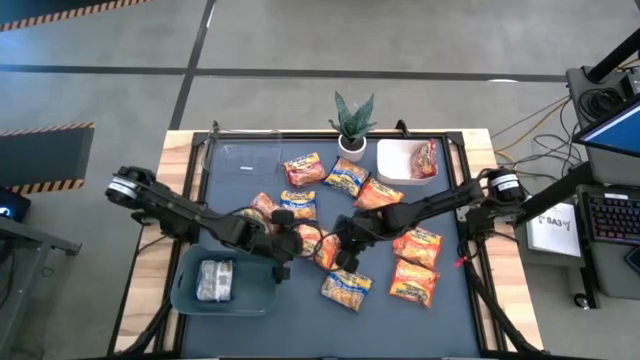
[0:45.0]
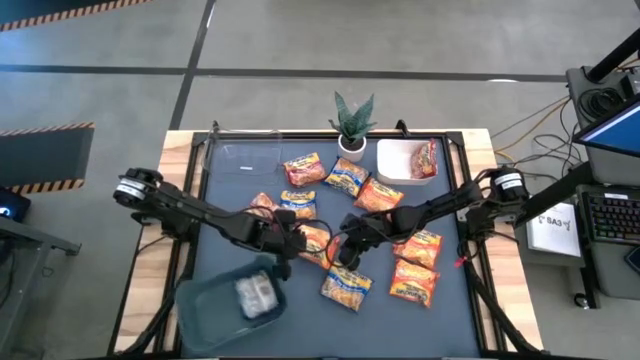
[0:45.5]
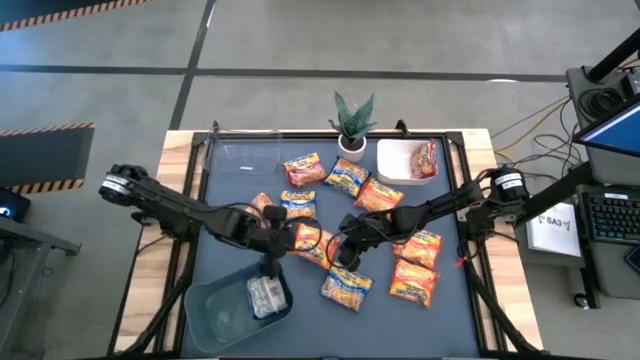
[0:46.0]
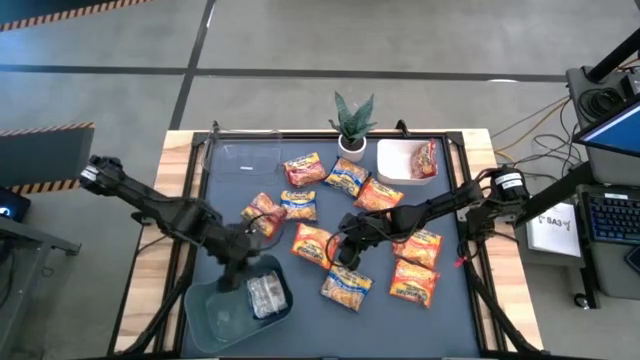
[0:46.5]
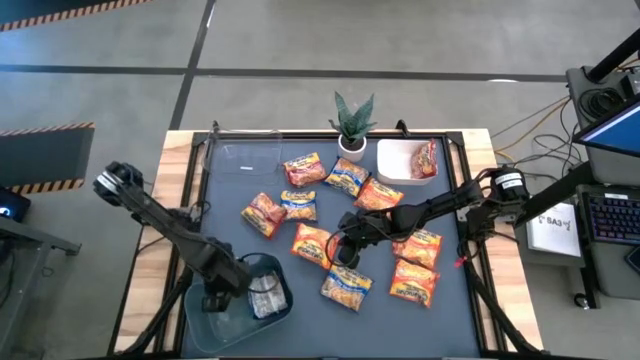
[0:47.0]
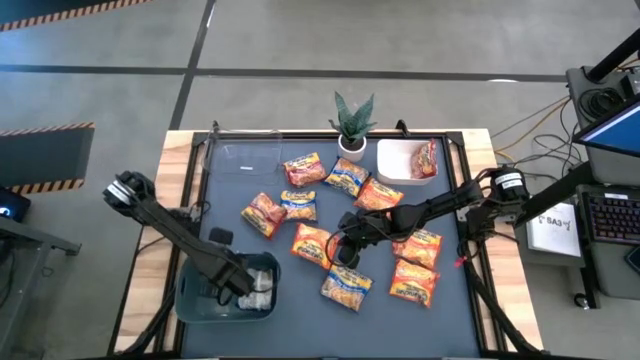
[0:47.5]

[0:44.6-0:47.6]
Task: Sort Maruchan noodles
Adjust the blue bin

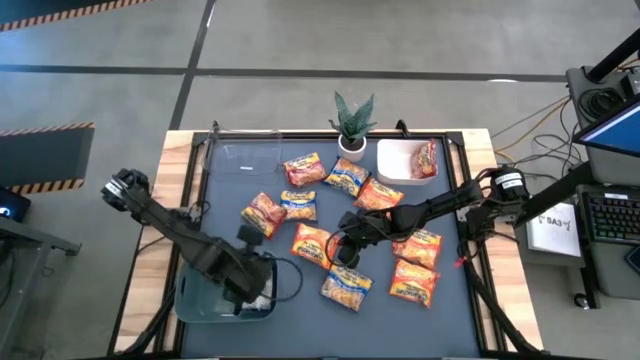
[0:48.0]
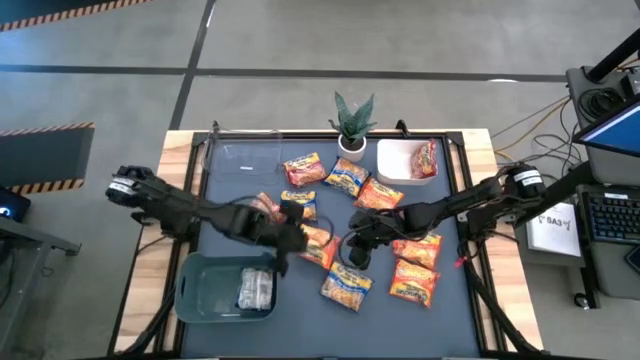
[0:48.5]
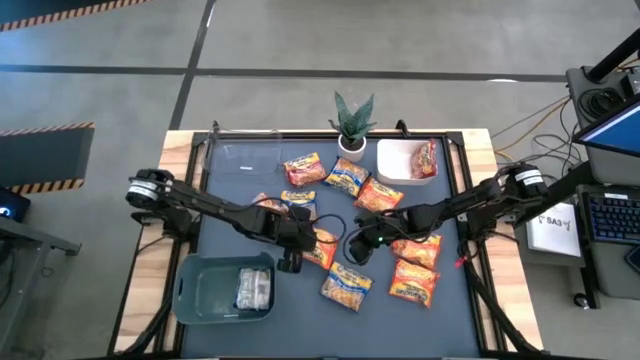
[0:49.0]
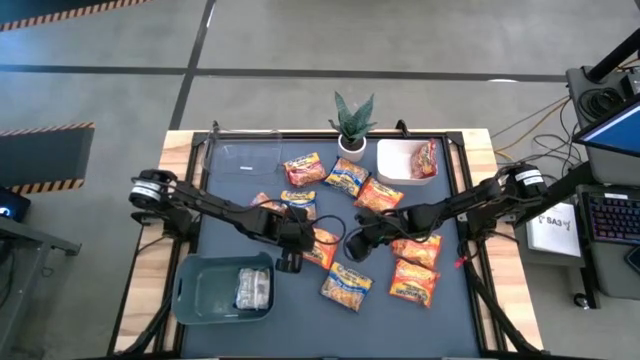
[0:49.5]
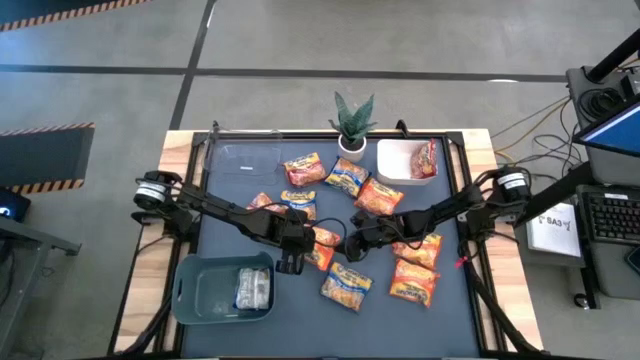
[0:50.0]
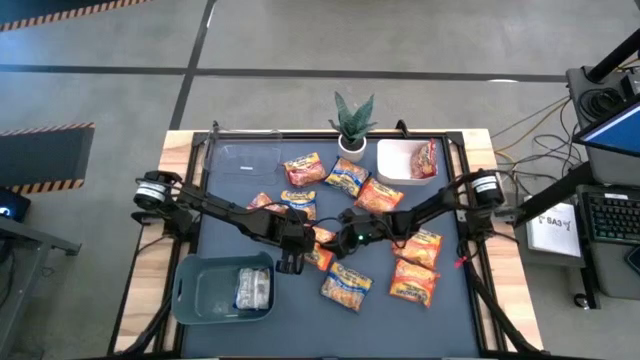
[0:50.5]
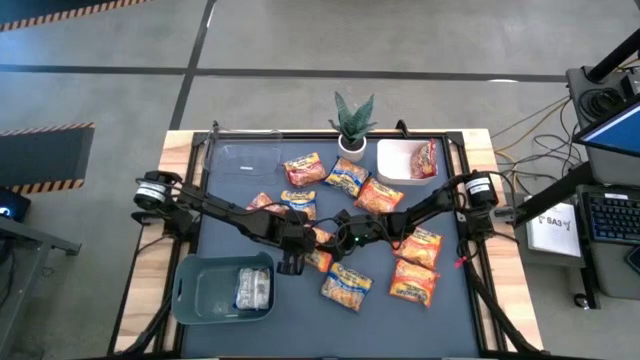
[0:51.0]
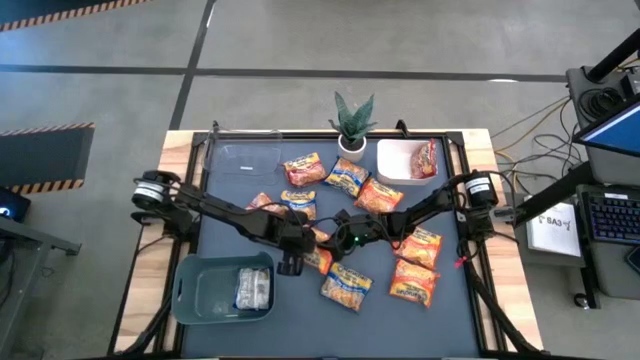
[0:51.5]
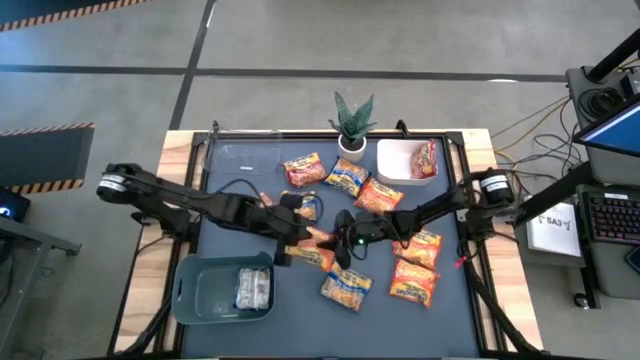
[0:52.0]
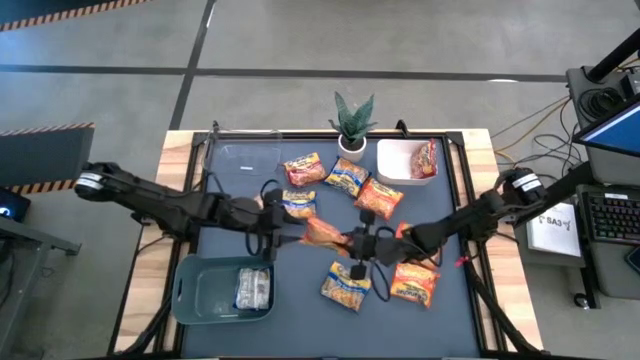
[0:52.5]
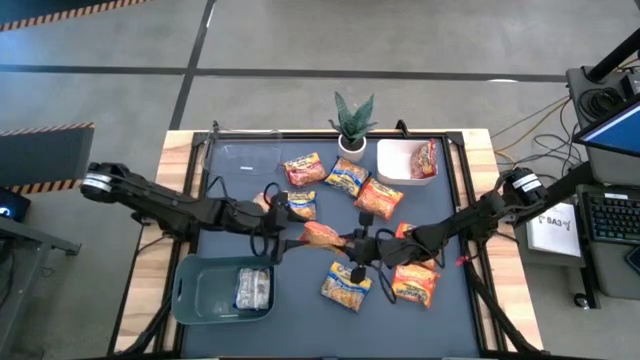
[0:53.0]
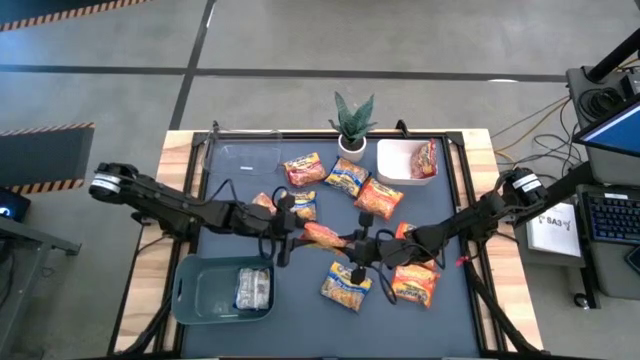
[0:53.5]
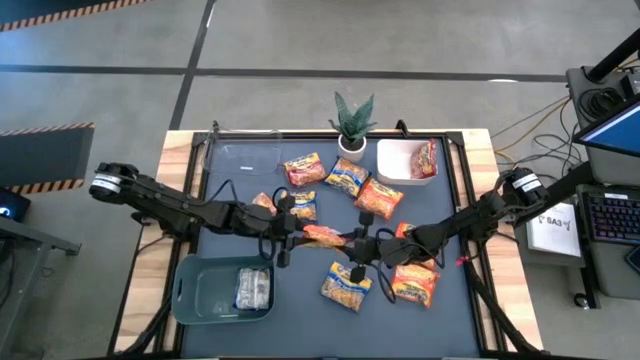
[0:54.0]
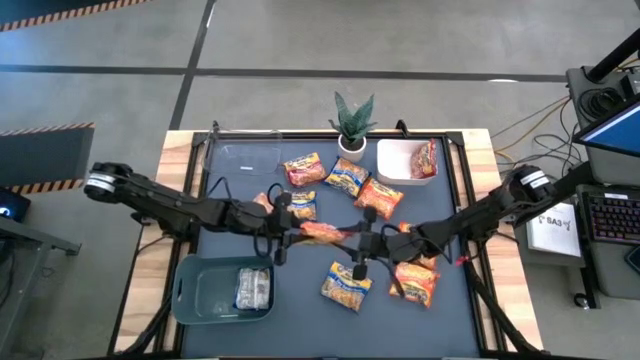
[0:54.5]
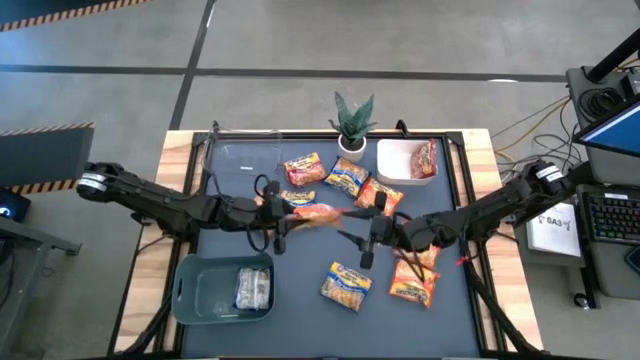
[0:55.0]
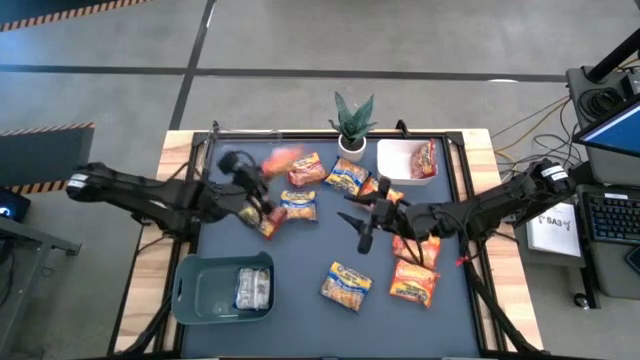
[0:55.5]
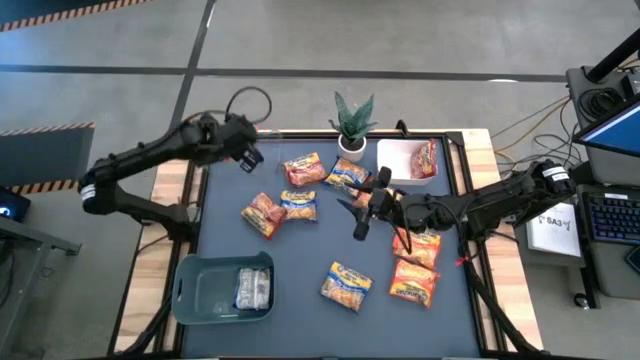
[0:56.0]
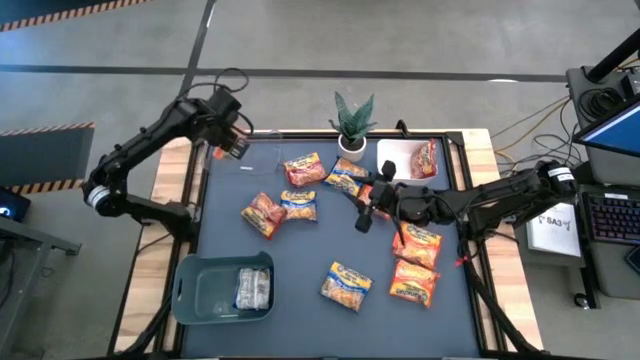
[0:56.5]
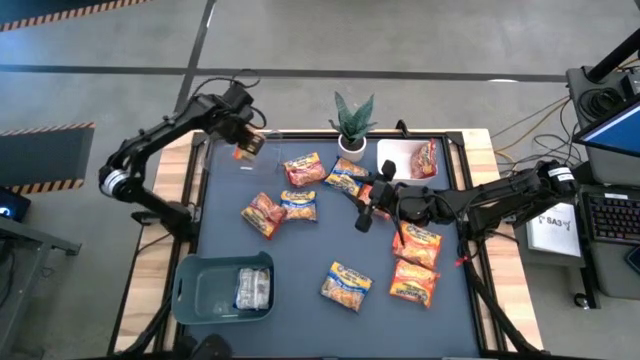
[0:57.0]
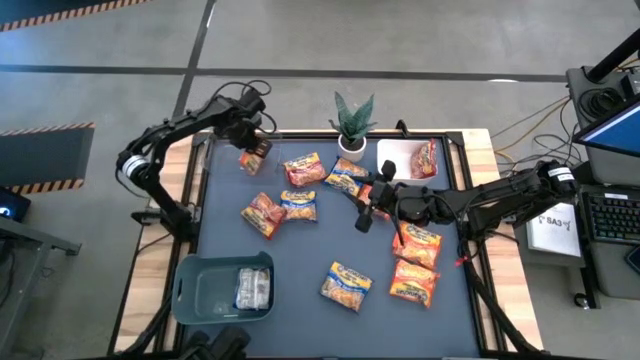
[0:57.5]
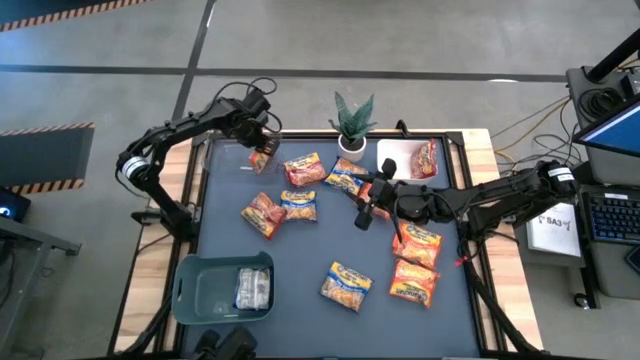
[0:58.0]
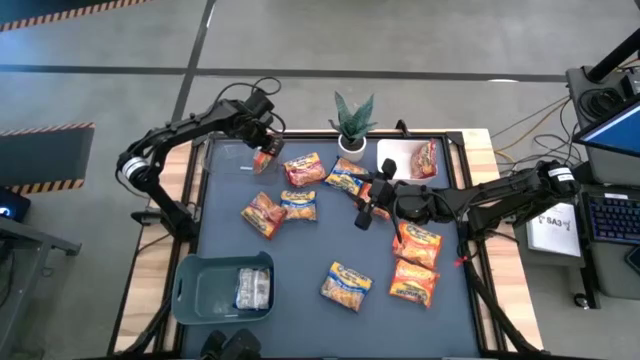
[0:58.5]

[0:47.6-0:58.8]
Put the orange noodle pack into the transparent bin

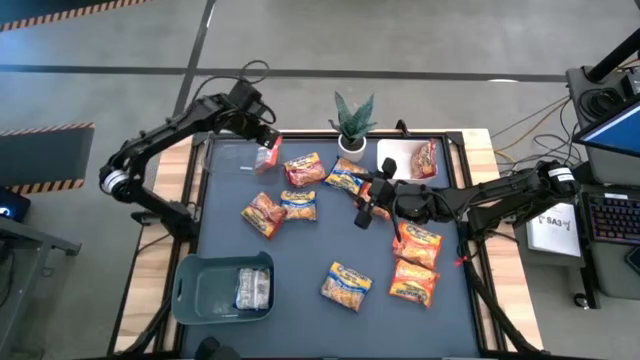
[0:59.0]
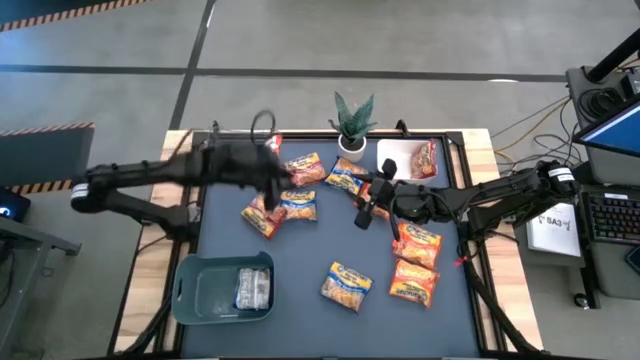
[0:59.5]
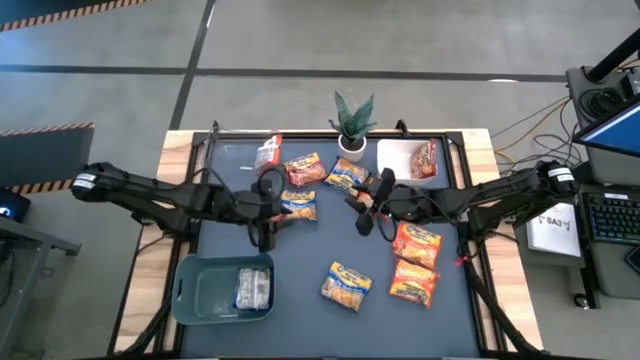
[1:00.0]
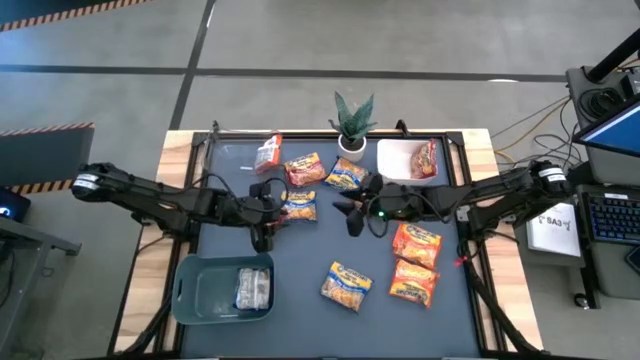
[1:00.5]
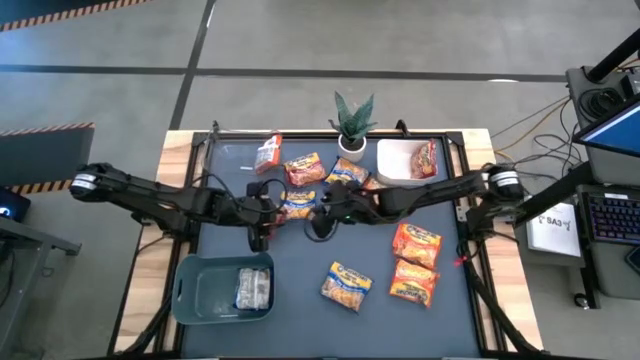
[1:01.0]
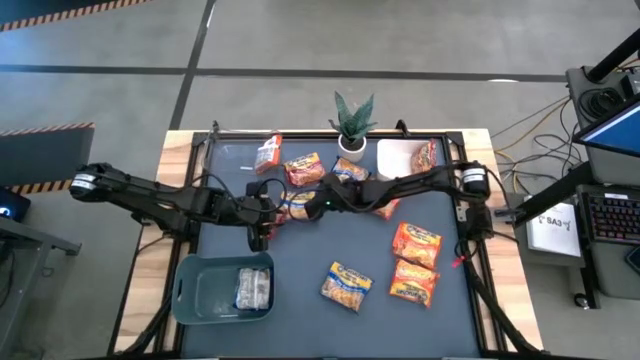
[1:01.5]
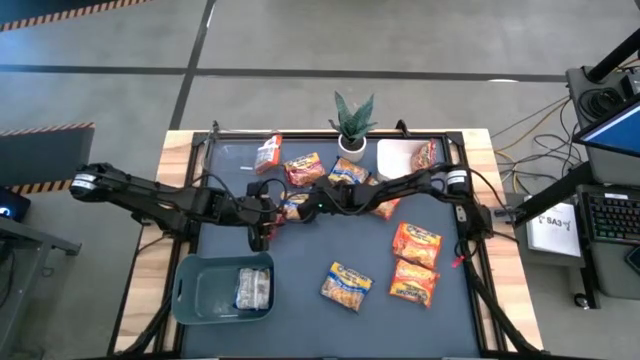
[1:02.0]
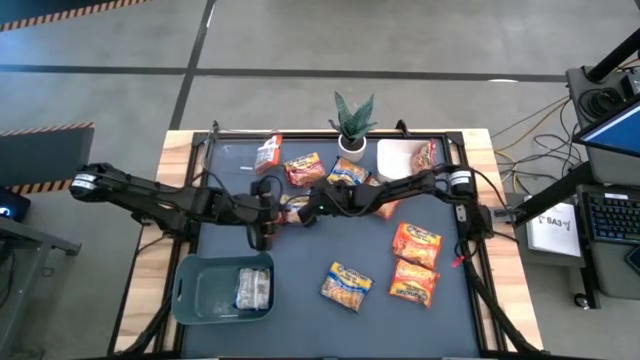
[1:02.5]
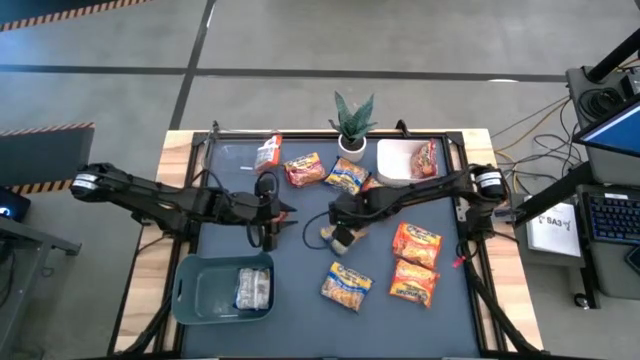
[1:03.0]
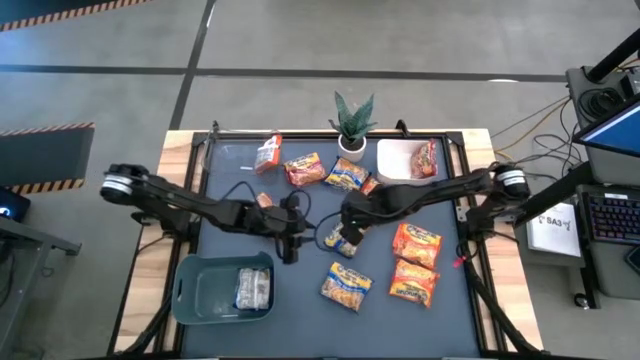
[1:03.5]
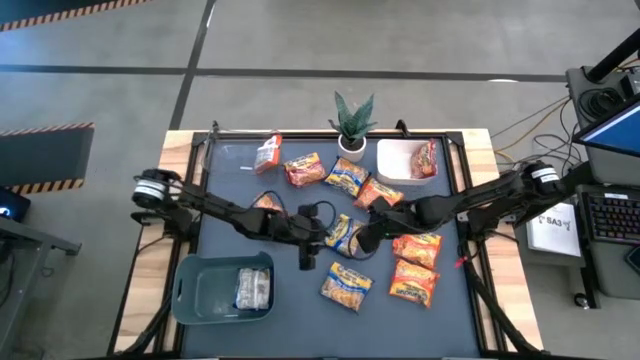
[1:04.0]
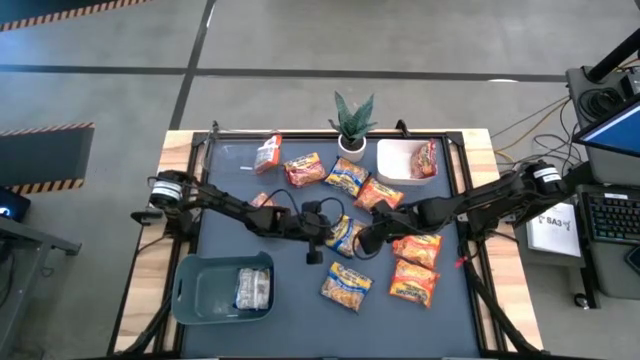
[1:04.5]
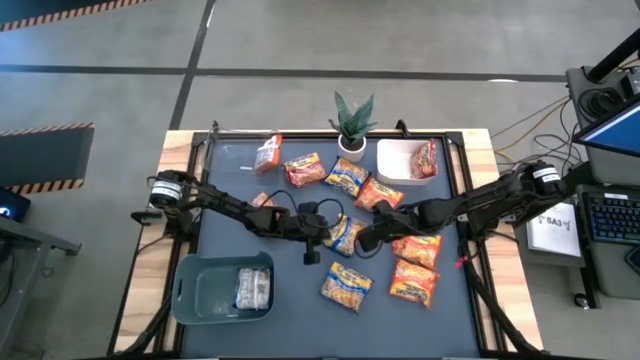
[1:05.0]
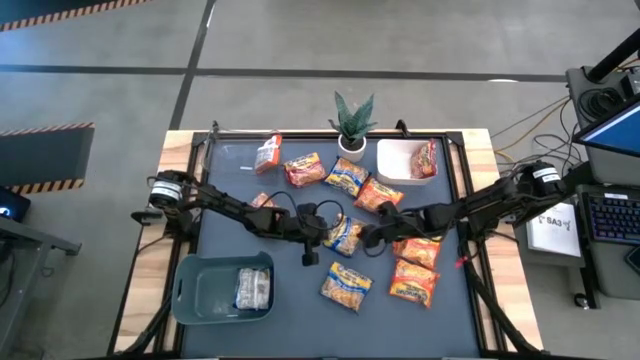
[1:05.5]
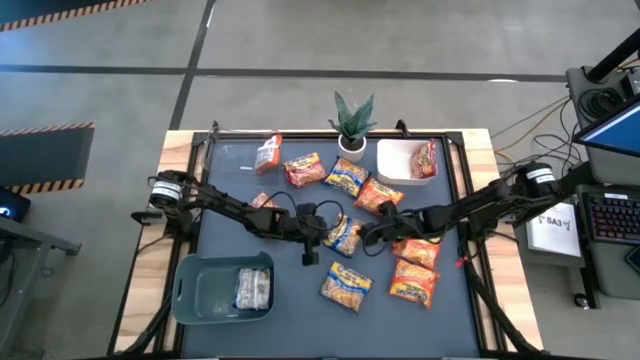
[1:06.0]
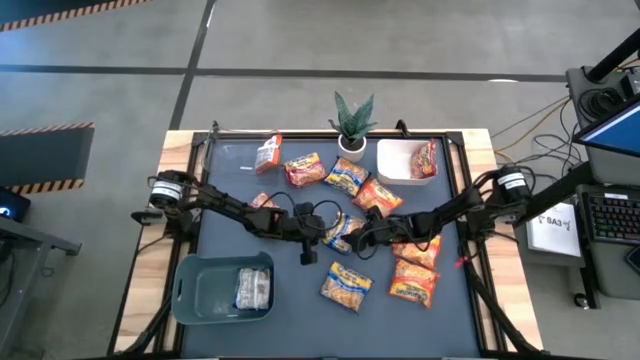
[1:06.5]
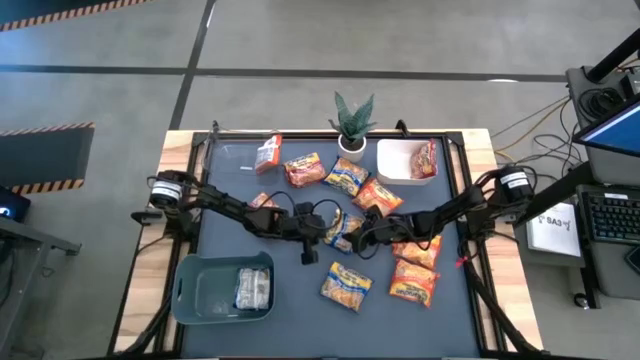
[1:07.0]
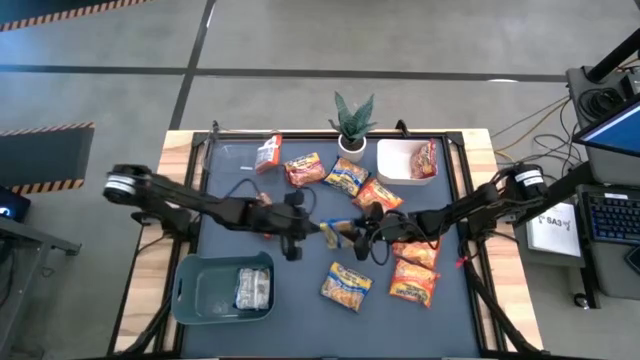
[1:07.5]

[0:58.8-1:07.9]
Put the blue noodle pack into the blue bin
